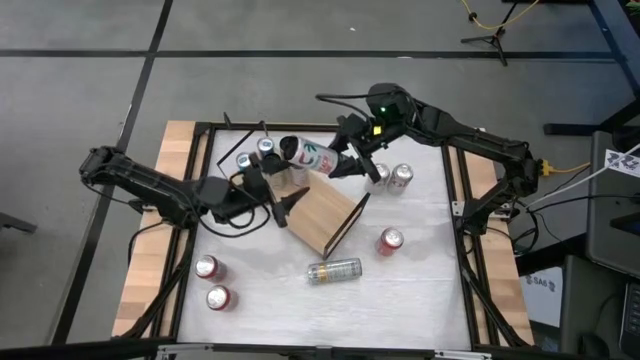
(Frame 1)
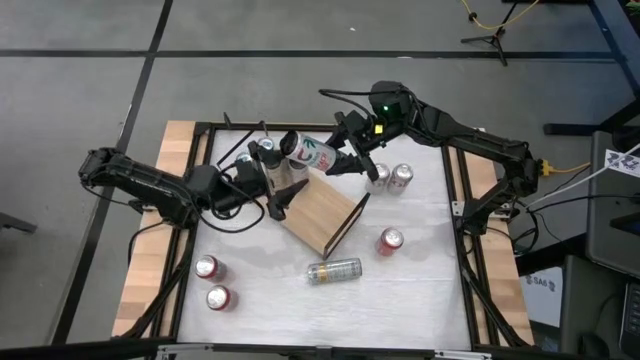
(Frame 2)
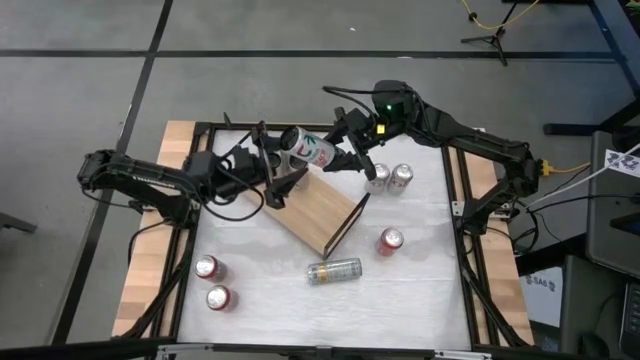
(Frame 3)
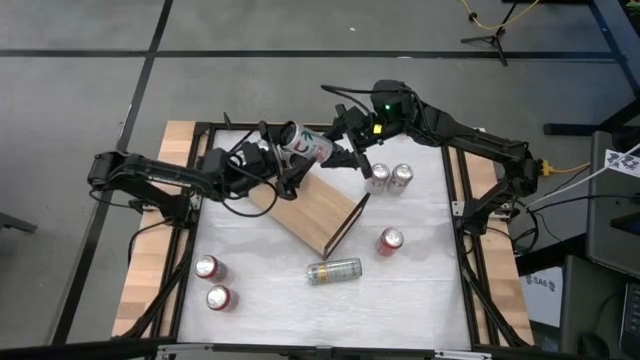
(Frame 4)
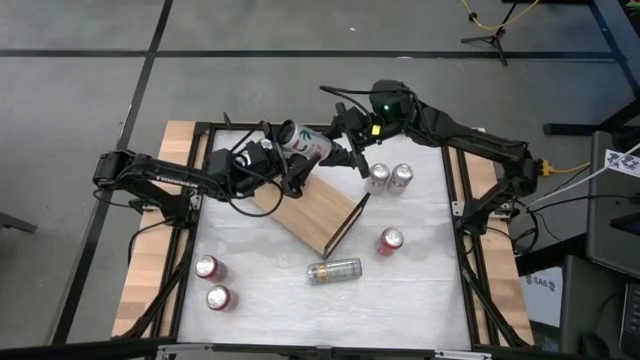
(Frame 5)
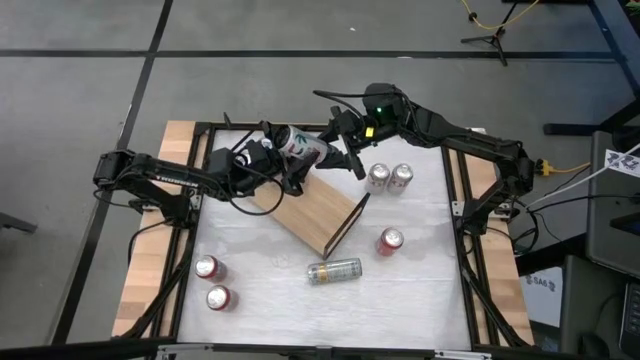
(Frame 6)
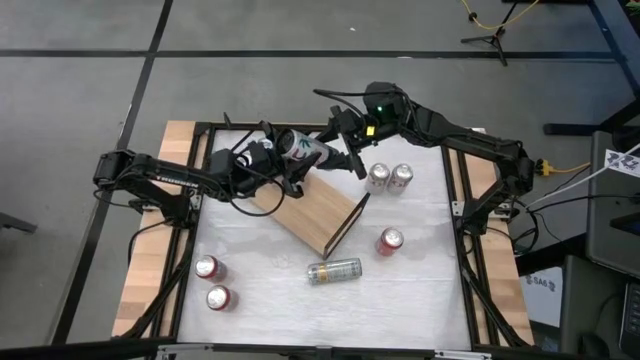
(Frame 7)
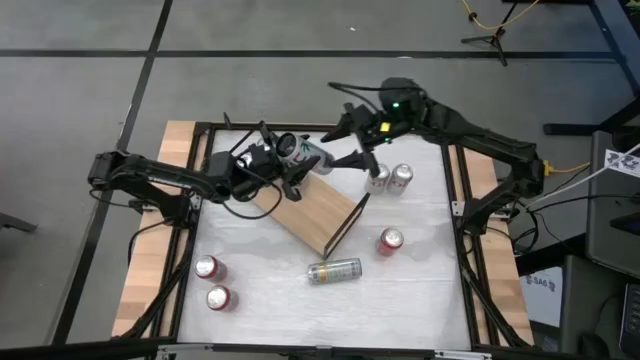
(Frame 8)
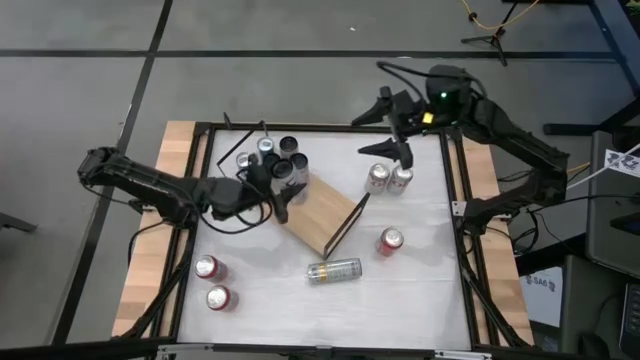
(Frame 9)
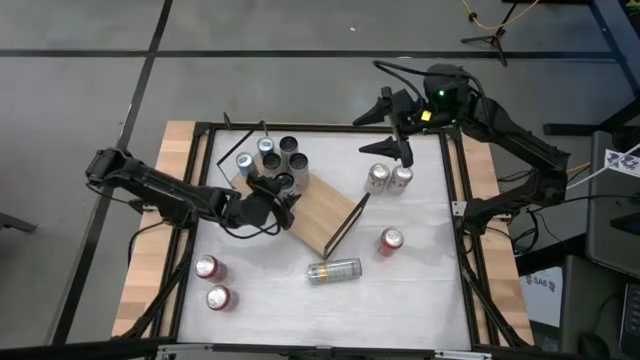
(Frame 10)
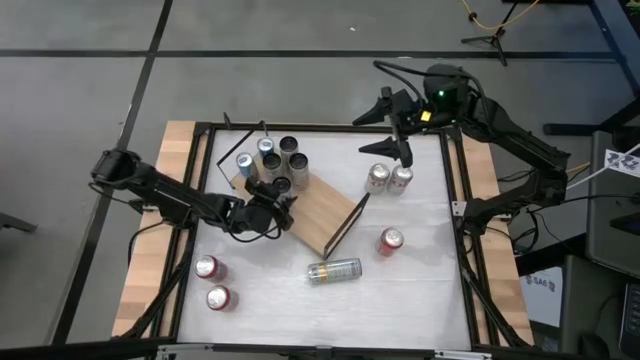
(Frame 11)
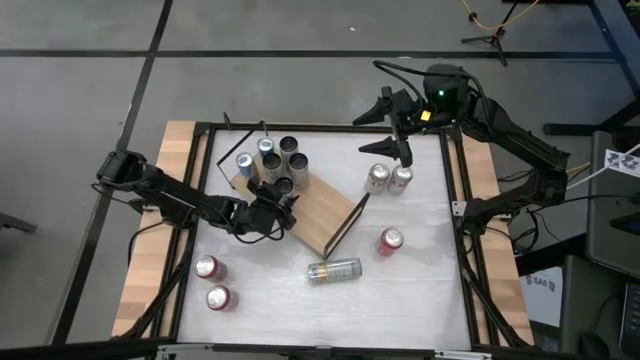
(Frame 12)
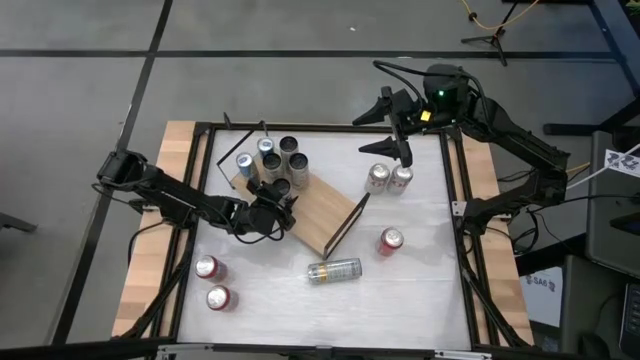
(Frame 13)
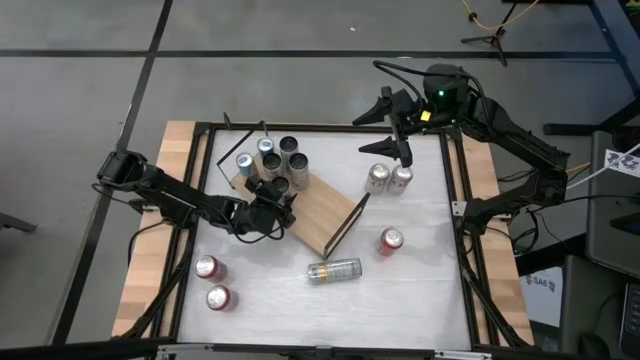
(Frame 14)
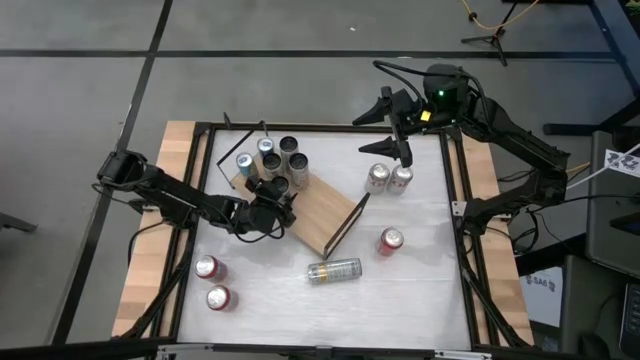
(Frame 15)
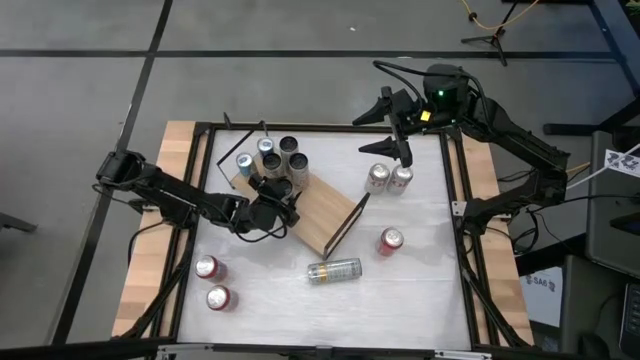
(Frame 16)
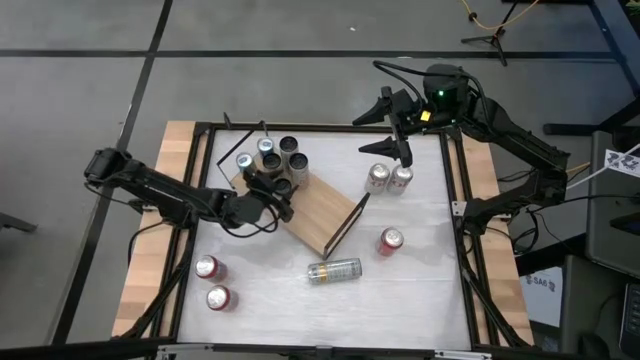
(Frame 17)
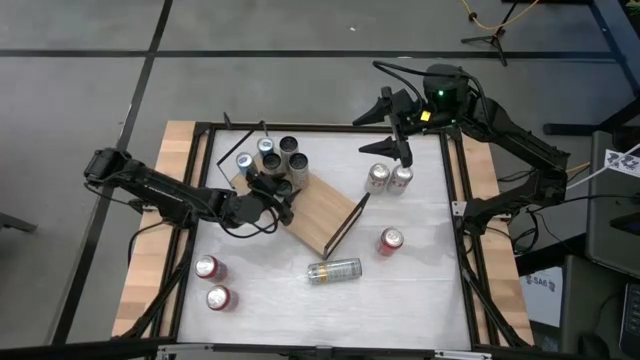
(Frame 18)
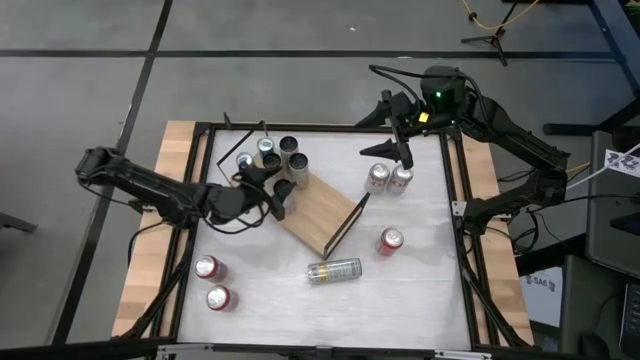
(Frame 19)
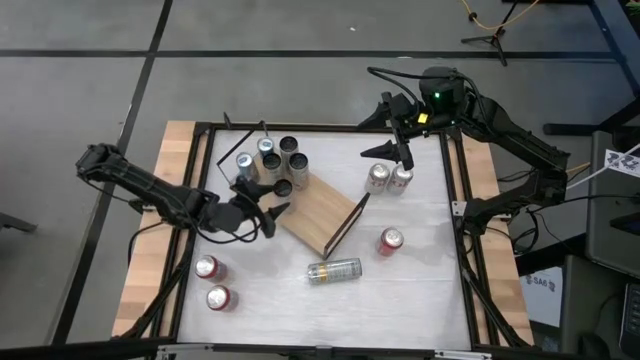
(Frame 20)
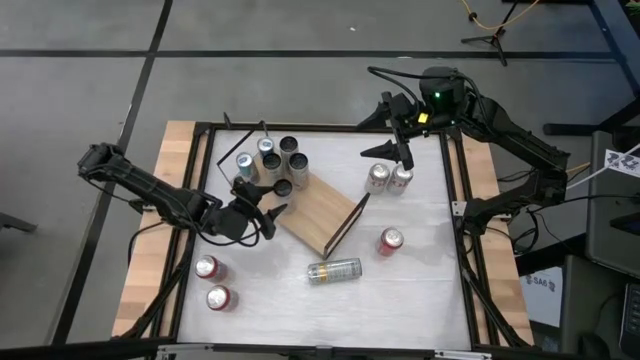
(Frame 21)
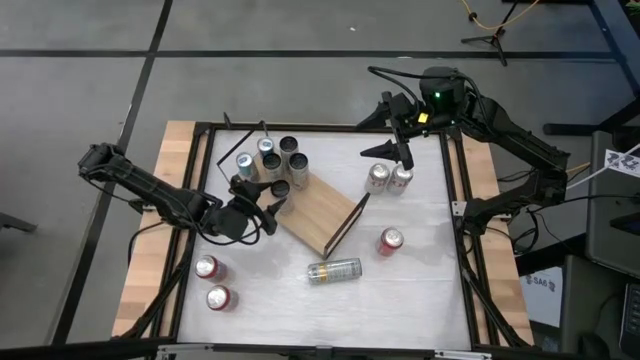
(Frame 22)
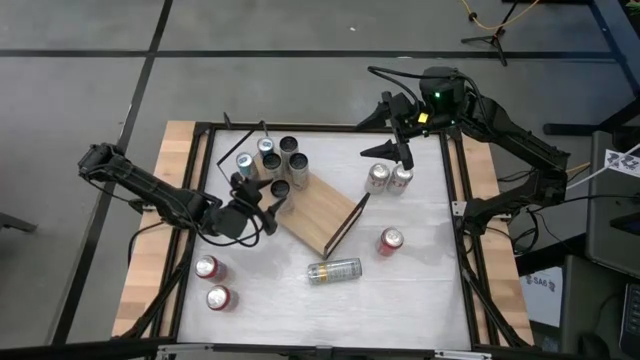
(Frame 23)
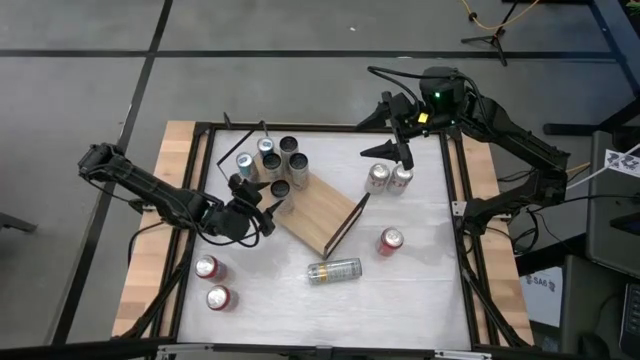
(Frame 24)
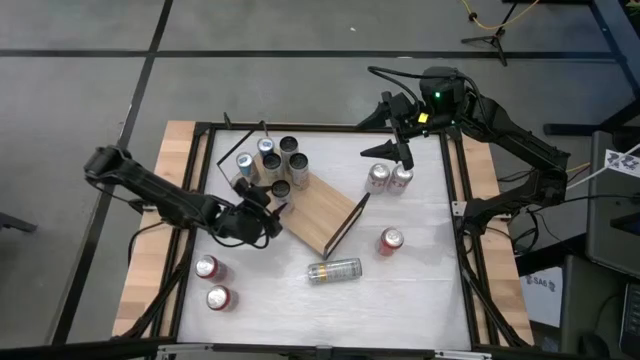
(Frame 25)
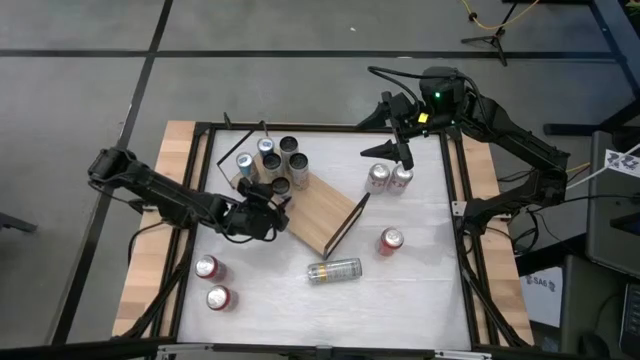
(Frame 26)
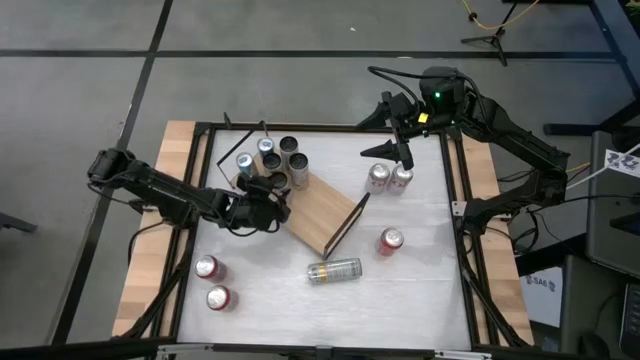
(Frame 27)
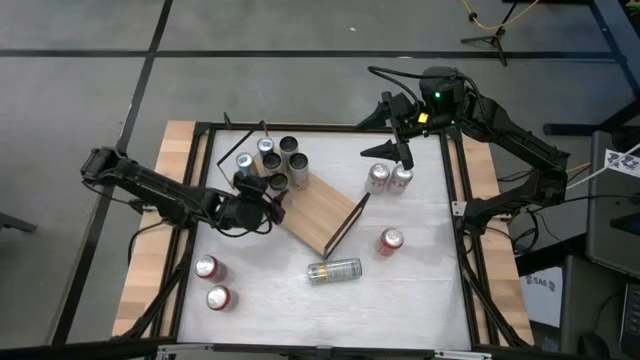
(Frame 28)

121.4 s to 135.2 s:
Task: Place canned beverage on shelf
Put the white-pink soda can aligned with the white-pink soda can on the shelf

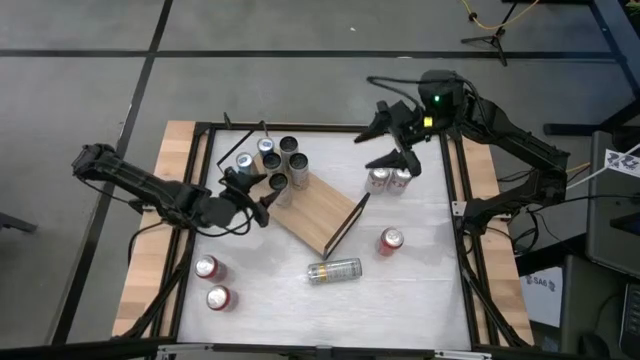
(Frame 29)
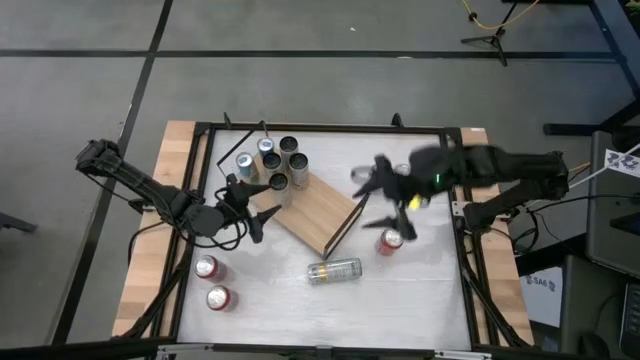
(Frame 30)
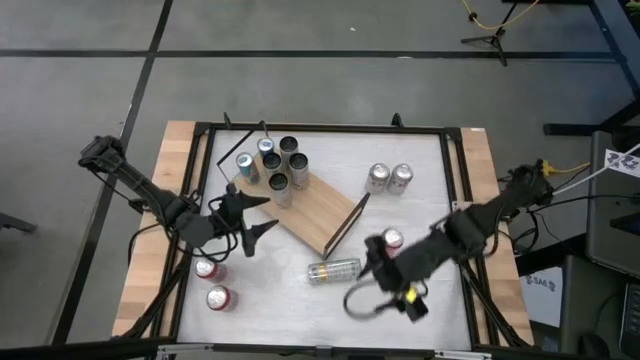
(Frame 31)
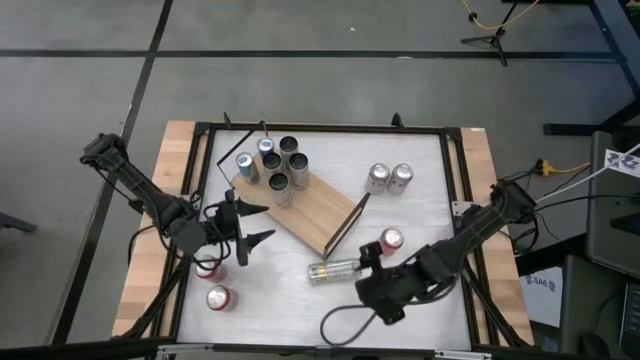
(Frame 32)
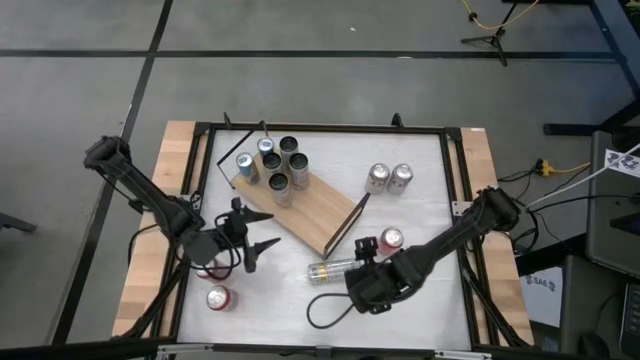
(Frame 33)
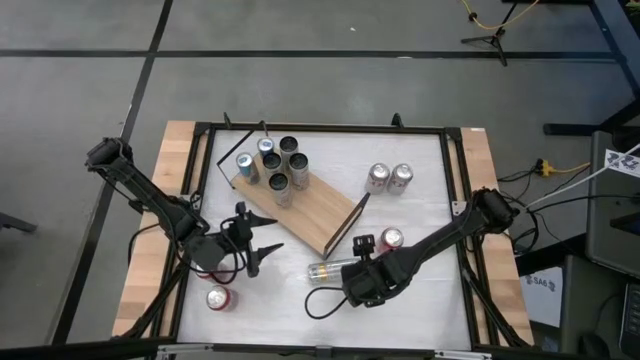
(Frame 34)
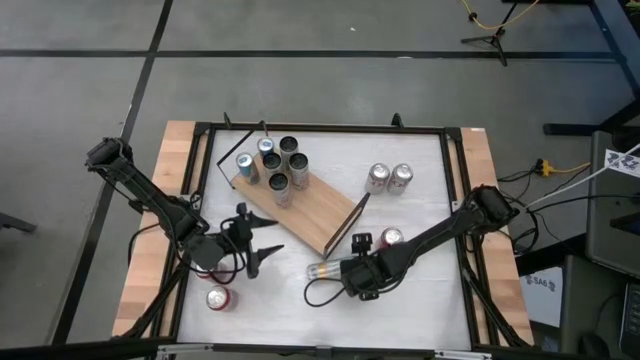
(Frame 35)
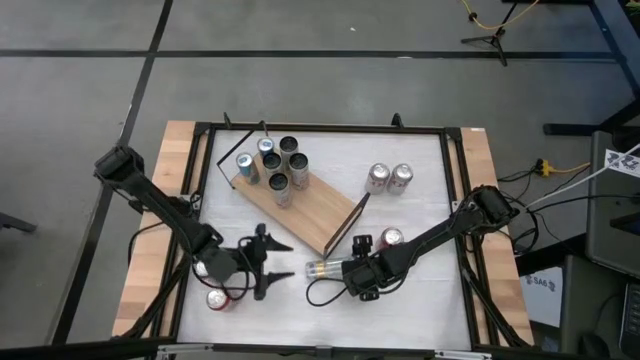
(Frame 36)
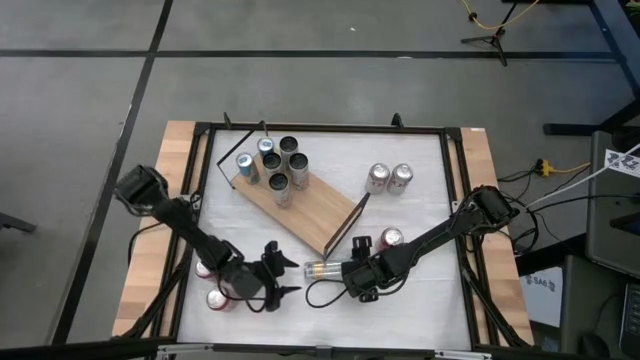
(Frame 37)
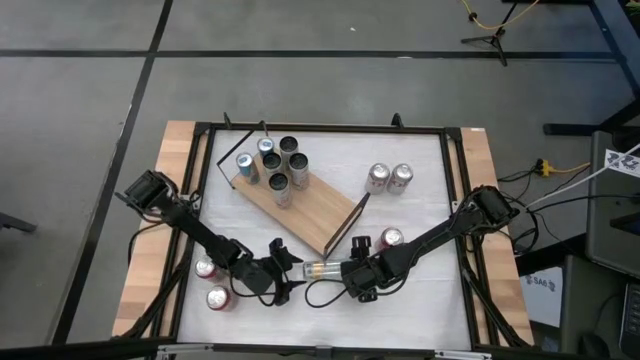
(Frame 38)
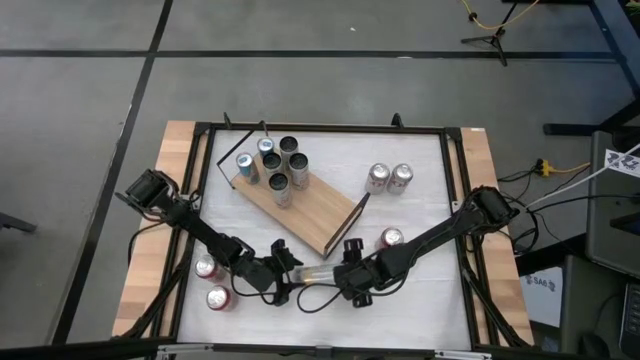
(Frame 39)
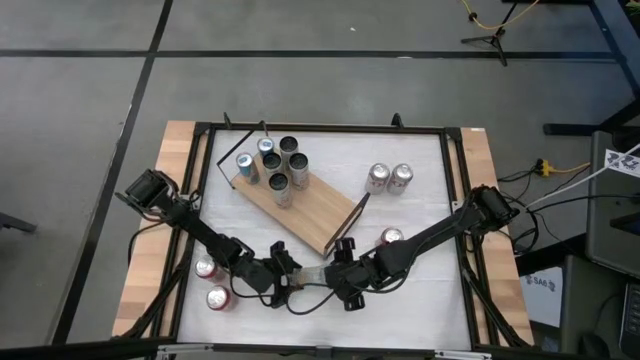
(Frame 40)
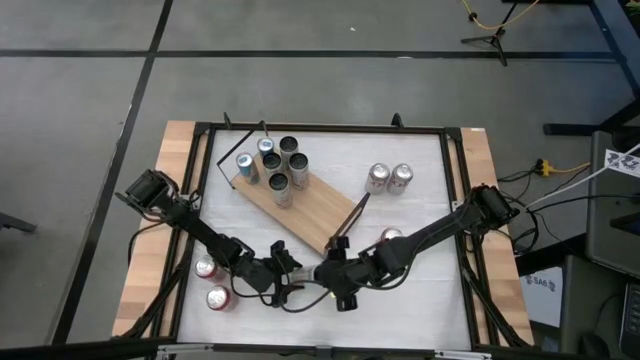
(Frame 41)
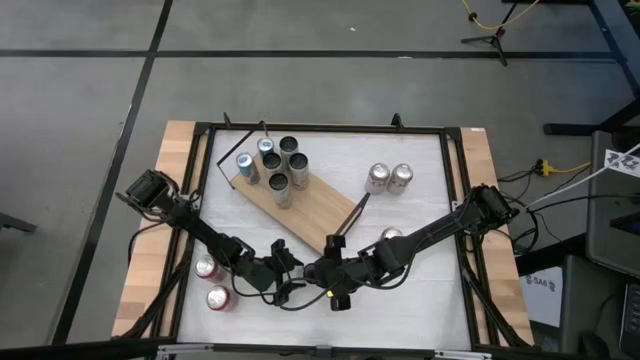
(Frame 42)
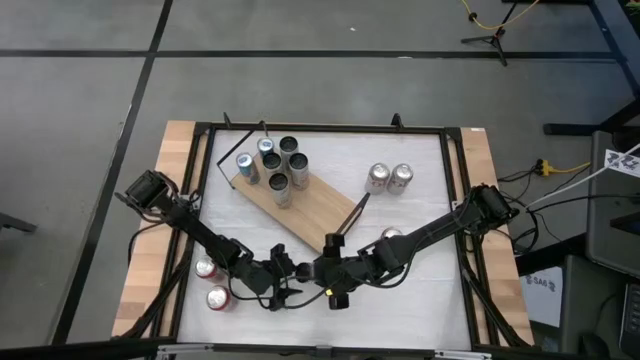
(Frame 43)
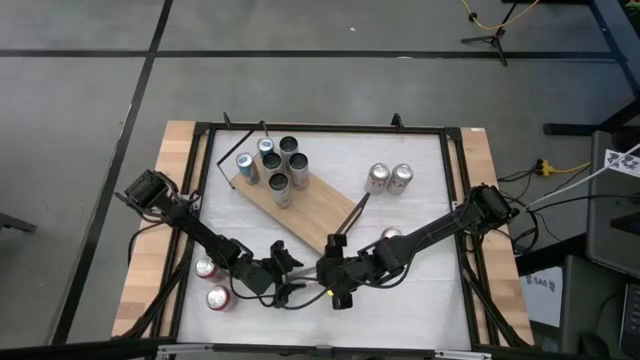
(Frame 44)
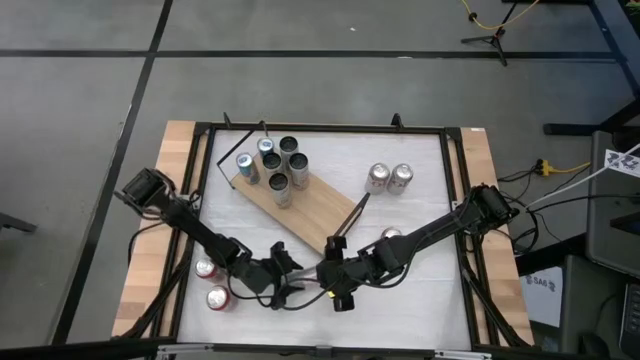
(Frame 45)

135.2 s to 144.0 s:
Put the white-yellow soda can aligned with the other white-yellow soda can on the shelf
